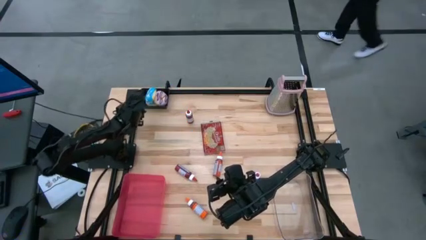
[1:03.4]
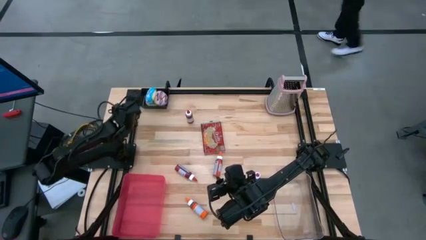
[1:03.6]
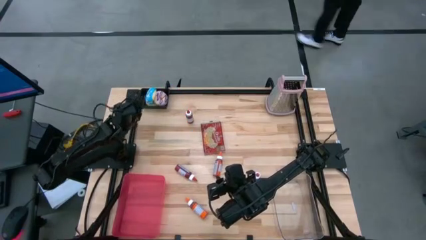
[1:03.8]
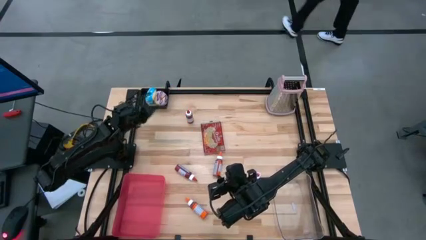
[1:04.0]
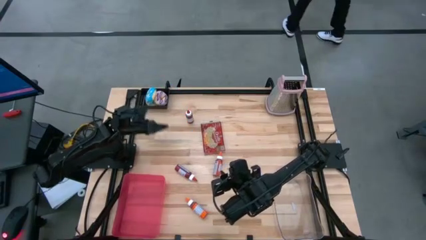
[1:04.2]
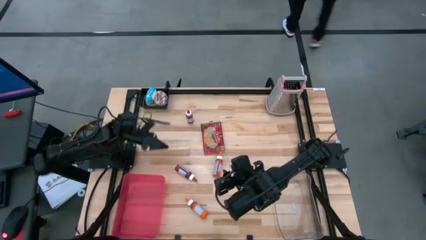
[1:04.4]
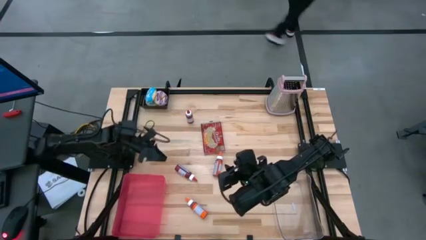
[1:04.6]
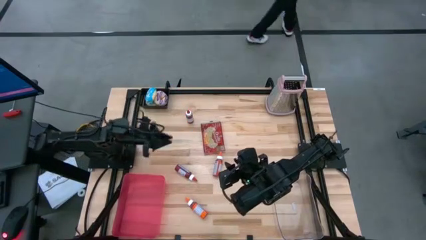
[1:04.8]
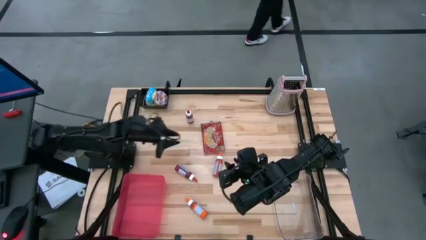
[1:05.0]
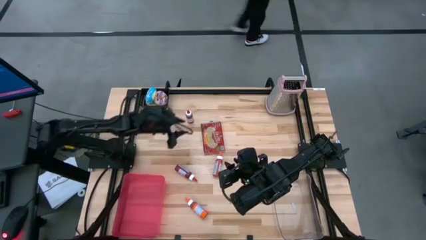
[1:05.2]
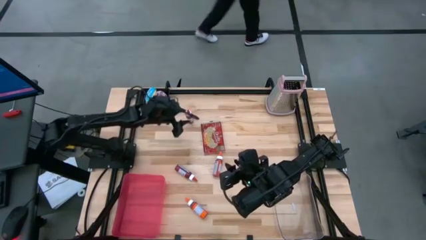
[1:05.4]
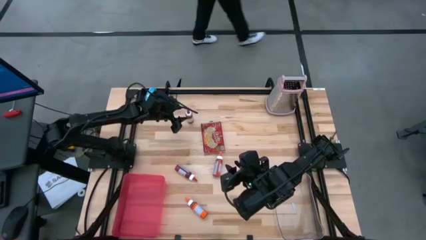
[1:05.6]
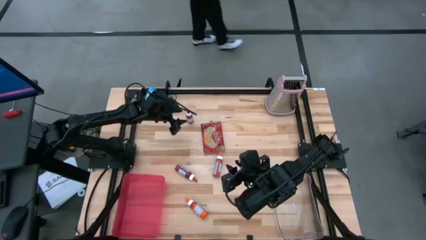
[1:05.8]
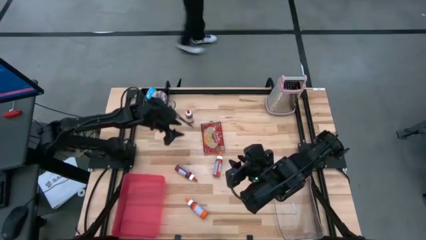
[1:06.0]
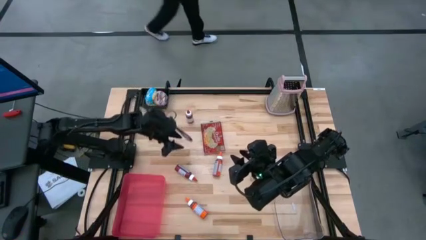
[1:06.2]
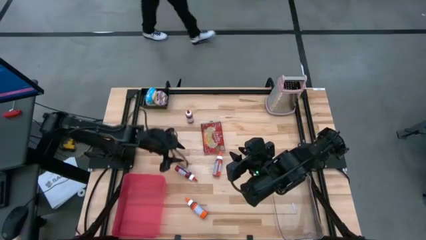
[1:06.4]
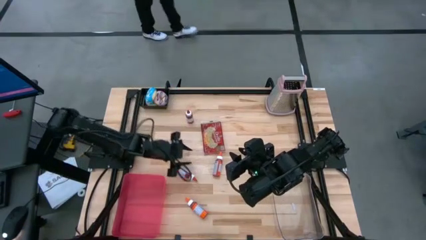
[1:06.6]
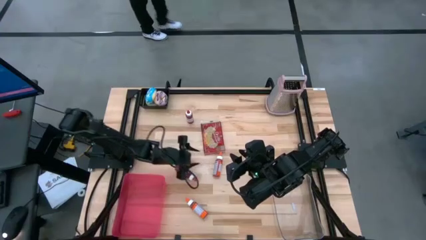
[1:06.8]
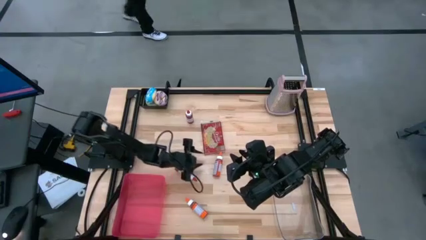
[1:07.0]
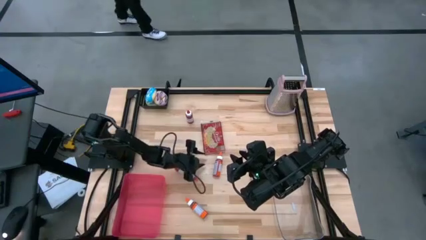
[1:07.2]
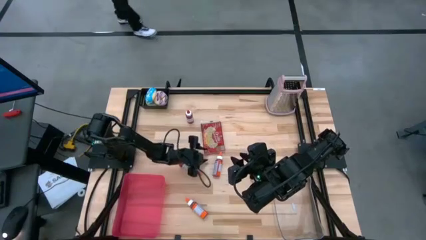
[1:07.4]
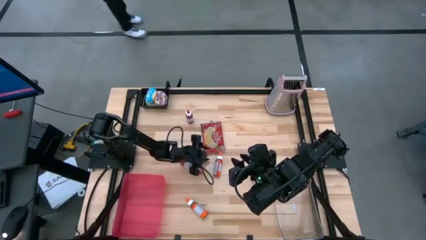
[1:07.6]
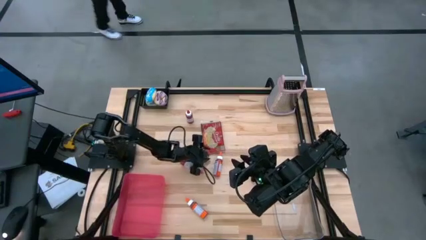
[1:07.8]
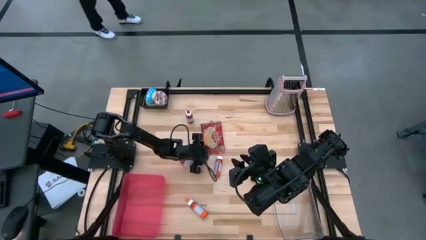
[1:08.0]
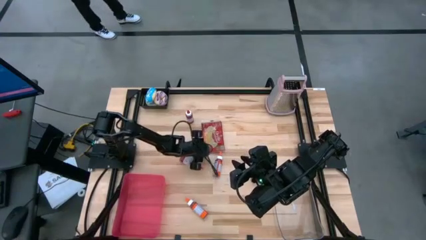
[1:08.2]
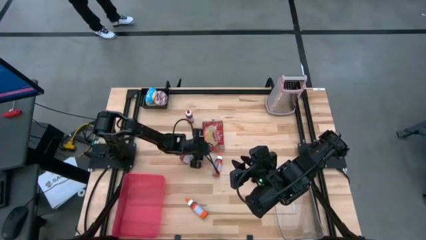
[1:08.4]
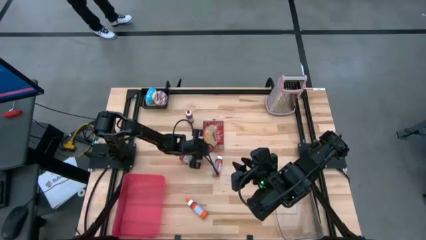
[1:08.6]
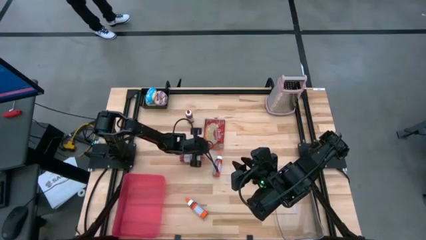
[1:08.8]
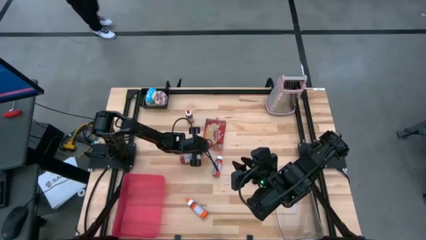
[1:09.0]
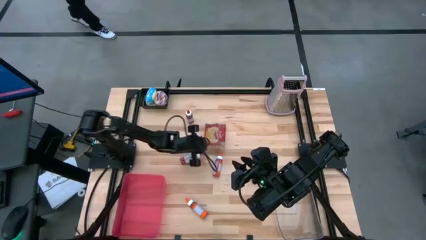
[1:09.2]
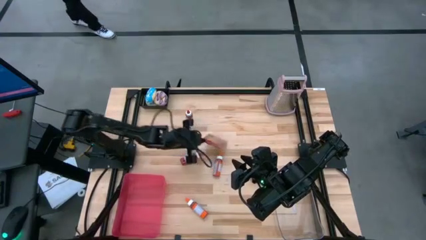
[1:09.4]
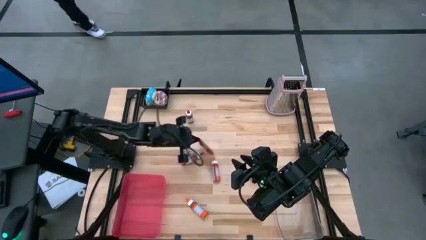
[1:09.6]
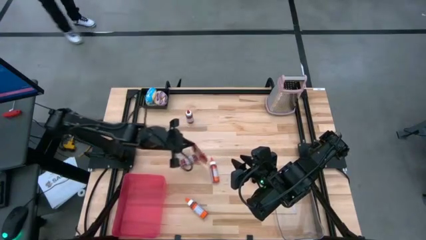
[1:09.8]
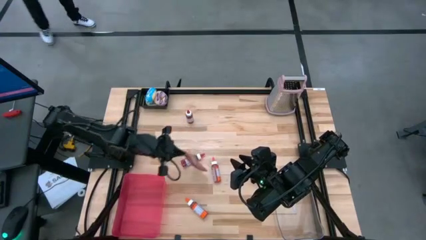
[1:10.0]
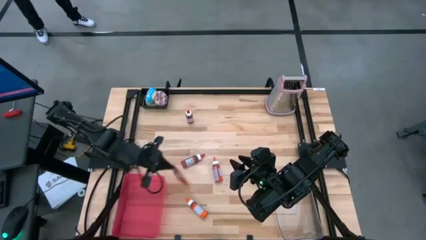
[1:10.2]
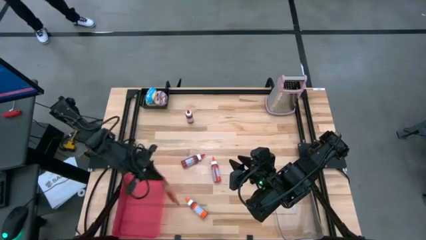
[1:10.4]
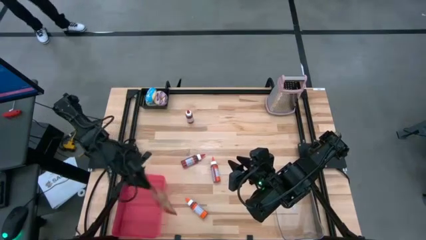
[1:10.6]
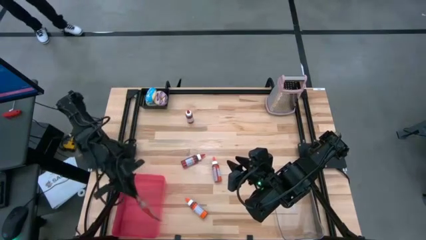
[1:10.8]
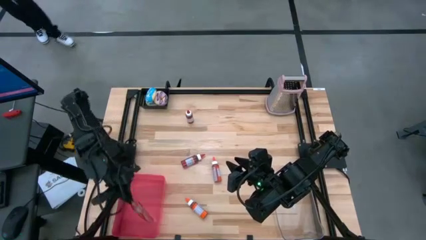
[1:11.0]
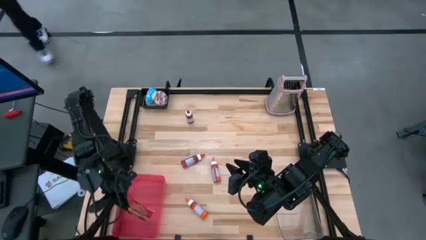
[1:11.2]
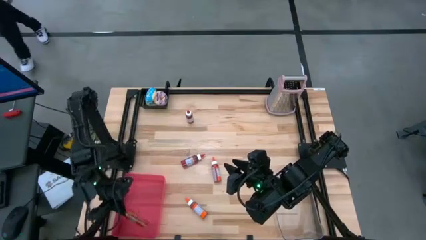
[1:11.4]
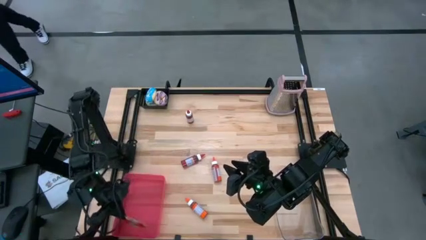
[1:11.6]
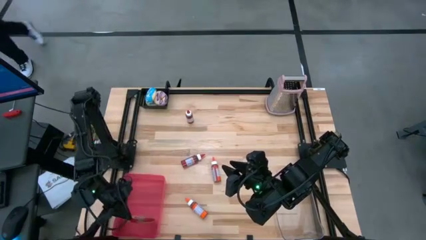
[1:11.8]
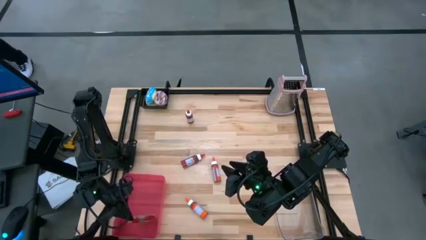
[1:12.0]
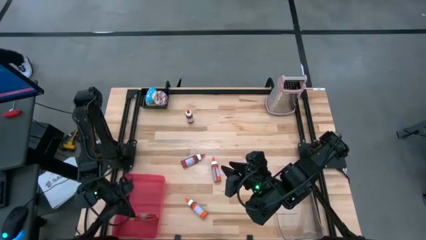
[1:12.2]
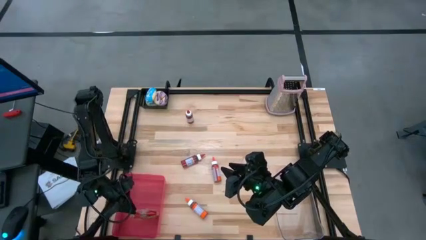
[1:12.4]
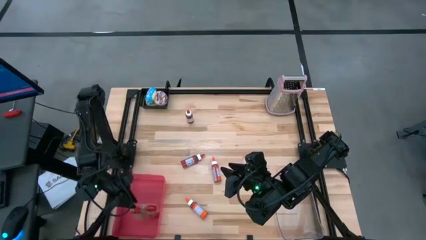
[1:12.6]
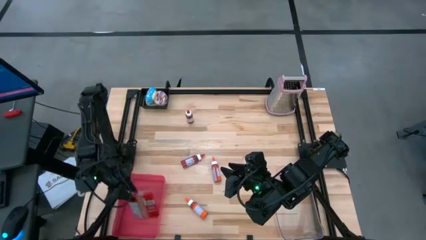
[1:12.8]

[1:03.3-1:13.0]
Put the red popcorn bag into the pink bin

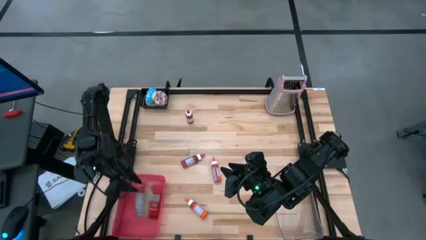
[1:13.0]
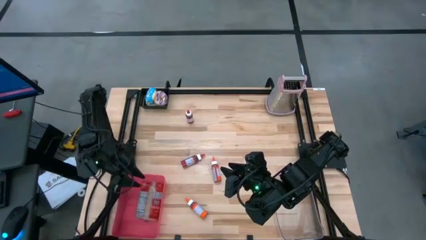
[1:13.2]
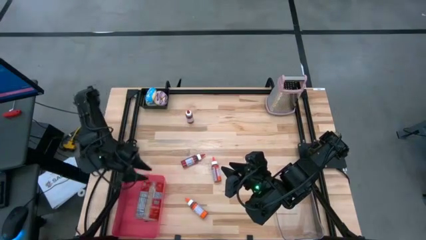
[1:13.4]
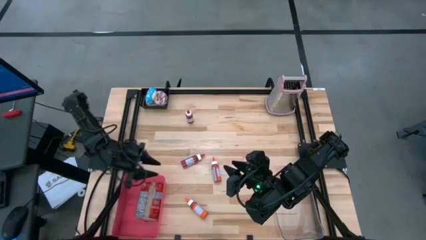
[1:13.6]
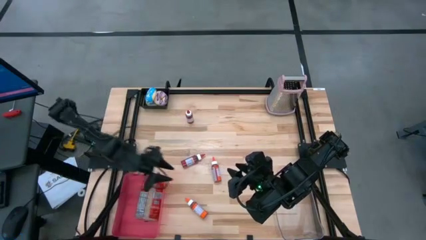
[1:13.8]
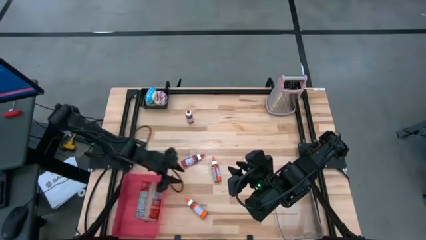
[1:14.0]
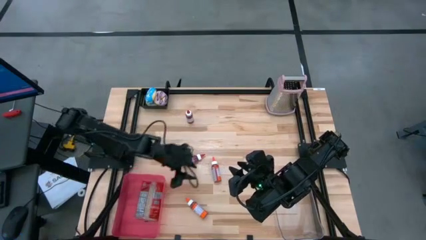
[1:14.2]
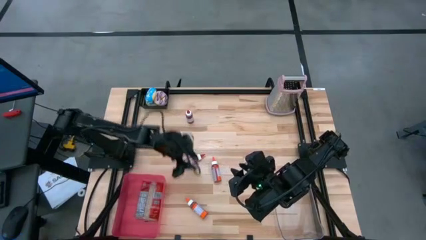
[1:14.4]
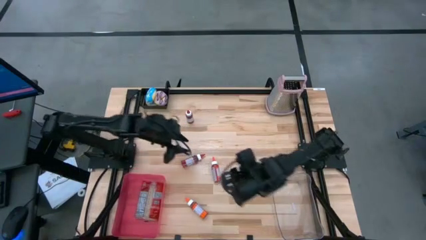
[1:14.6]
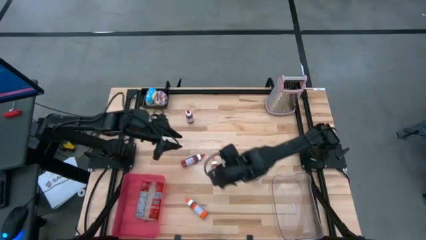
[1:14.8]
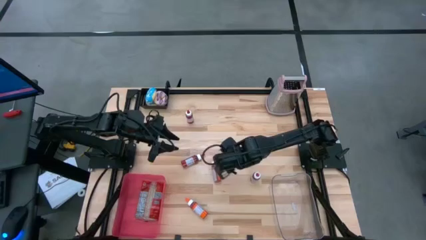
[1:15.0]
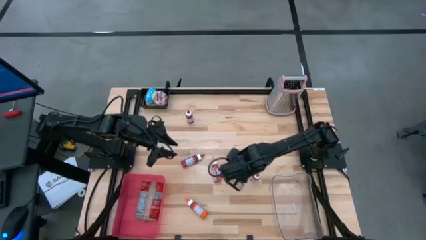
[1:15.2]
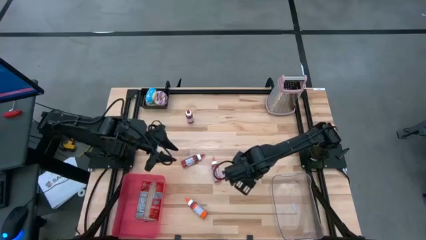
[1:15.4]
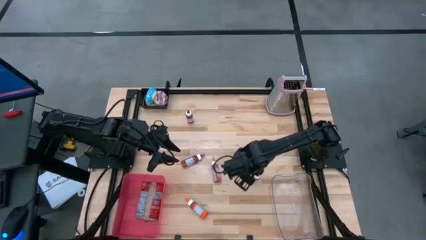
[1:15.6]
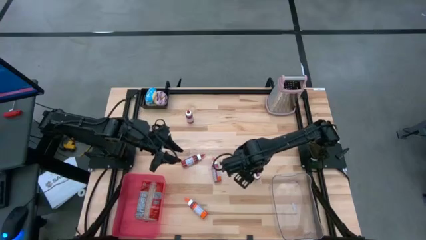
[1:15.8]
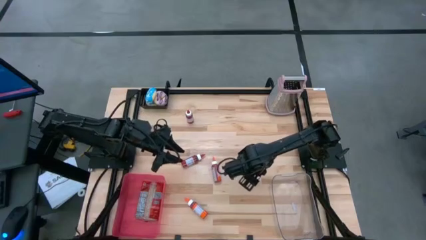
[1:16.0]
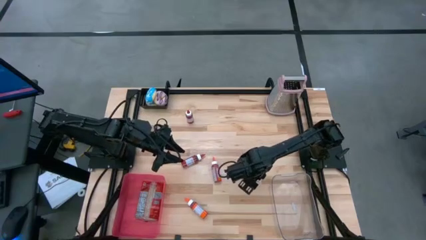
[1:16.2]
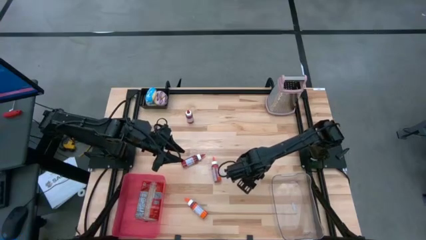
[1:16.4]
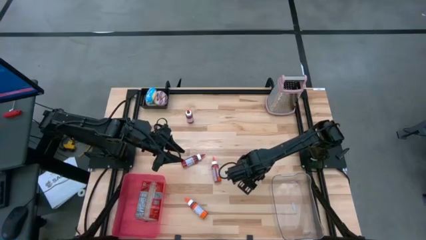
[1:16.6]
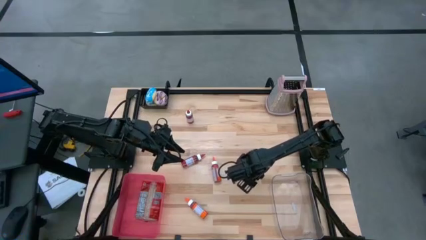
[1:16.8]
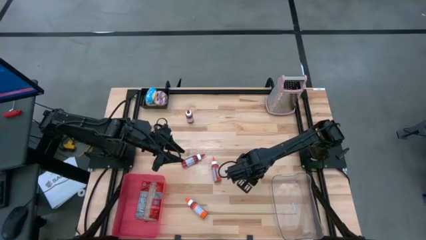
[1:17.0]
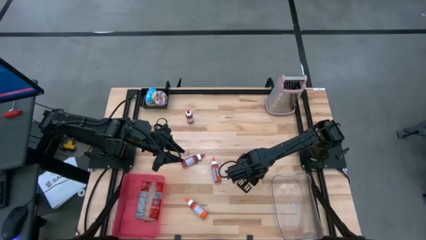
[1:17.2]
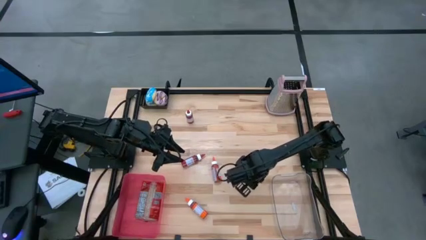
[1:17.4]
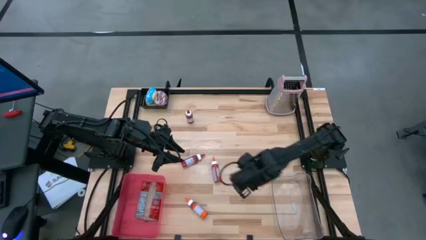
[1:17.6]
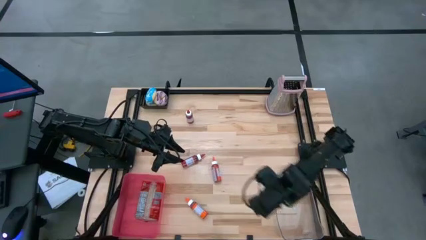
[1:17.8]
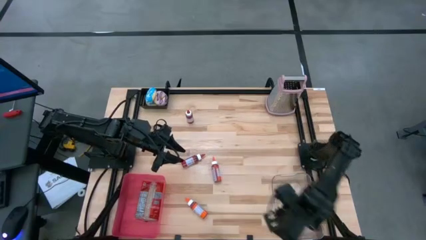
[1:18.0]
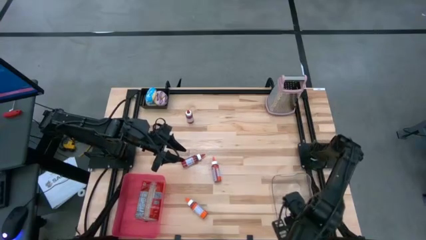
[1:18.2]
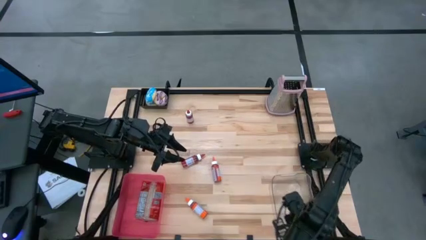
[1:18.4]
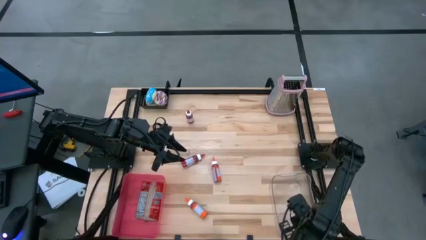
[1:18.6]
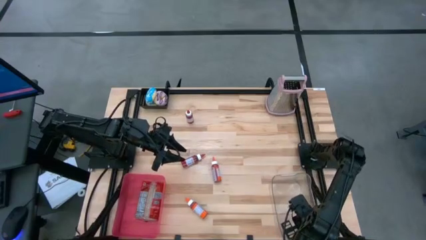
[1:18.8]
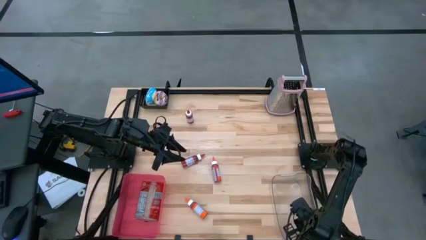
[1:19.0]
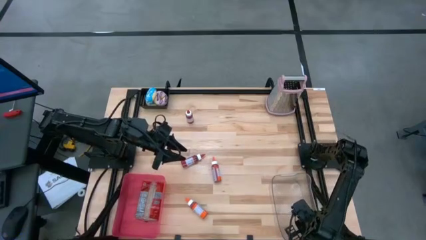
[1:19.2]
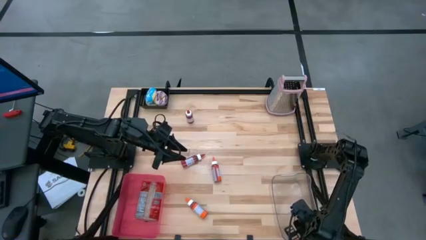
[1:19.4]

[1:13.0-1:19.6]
Put the right red food coloring bottle into the transparent bin
